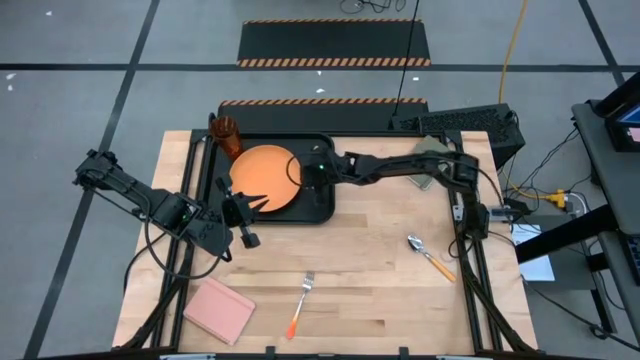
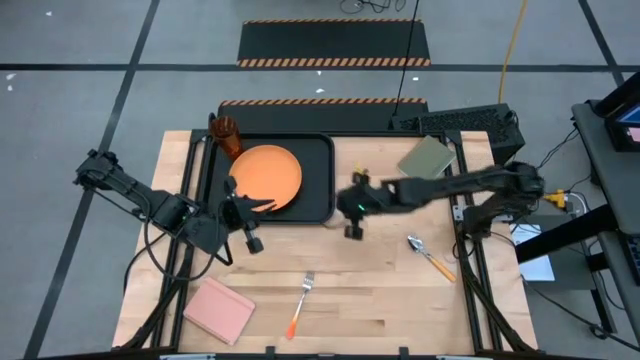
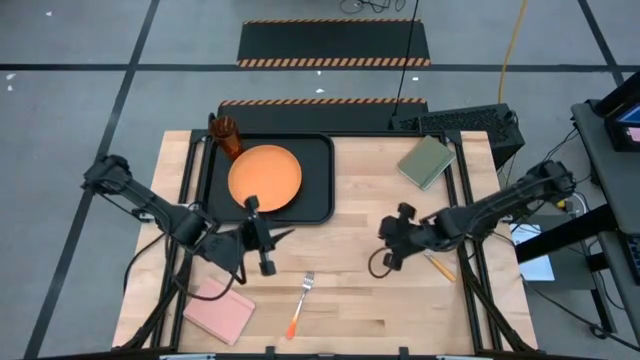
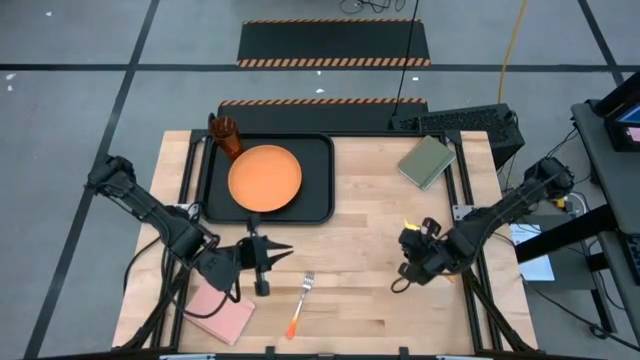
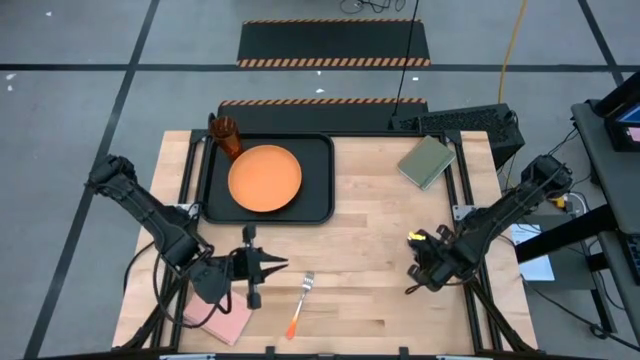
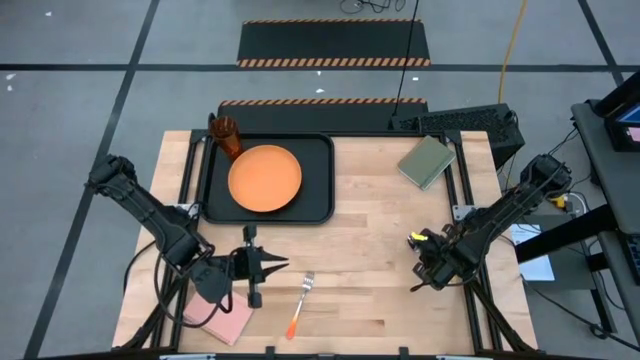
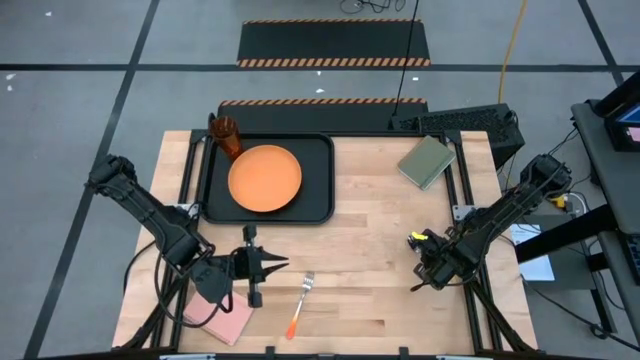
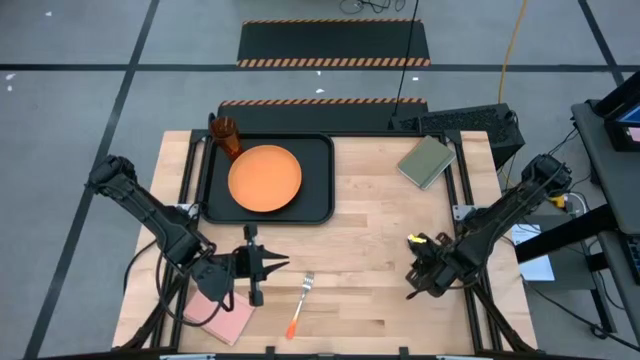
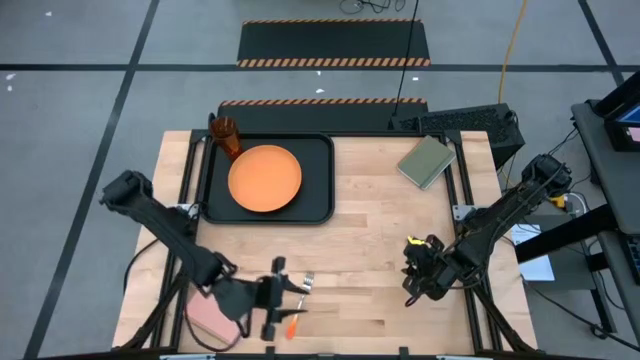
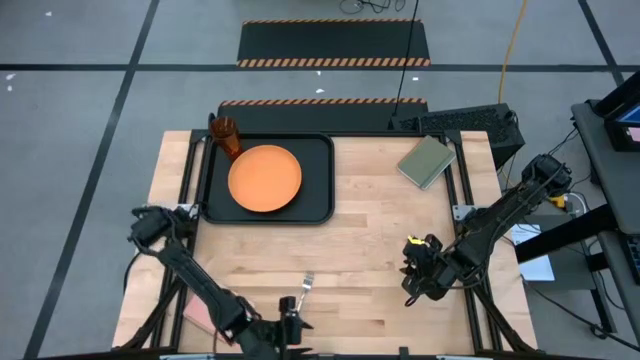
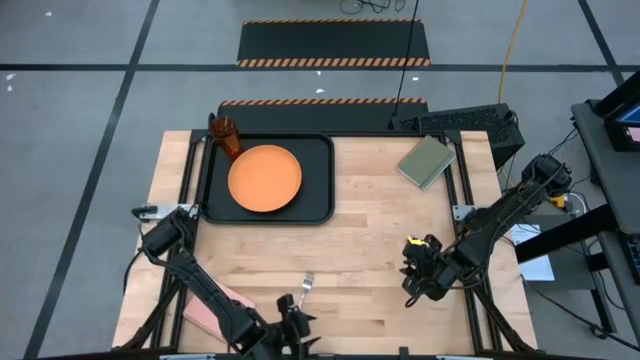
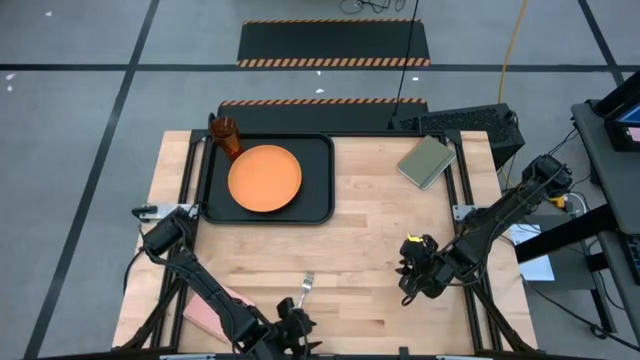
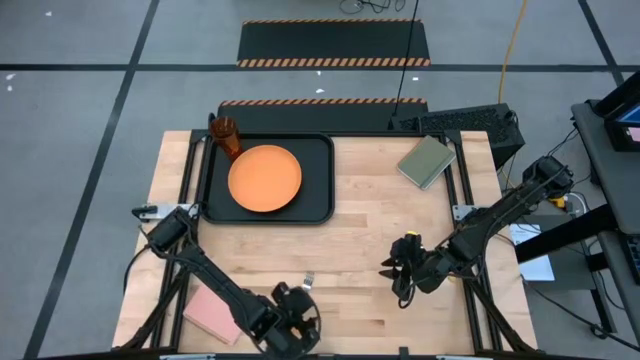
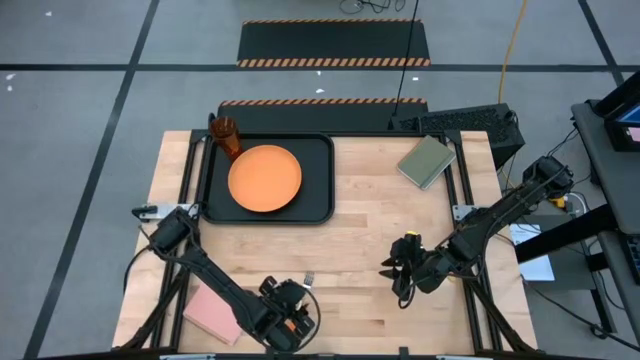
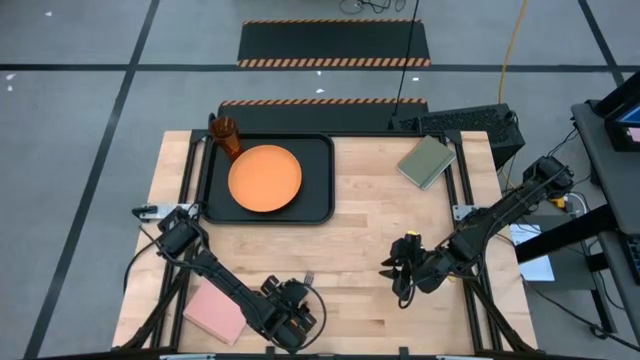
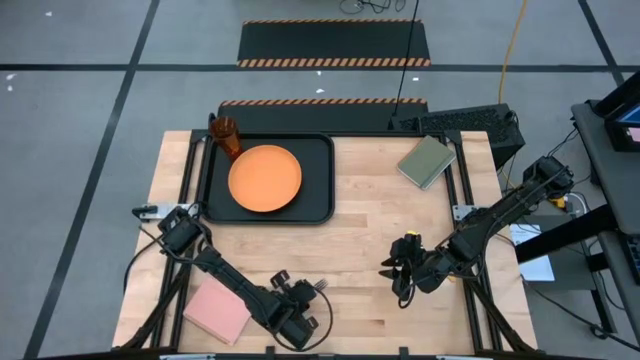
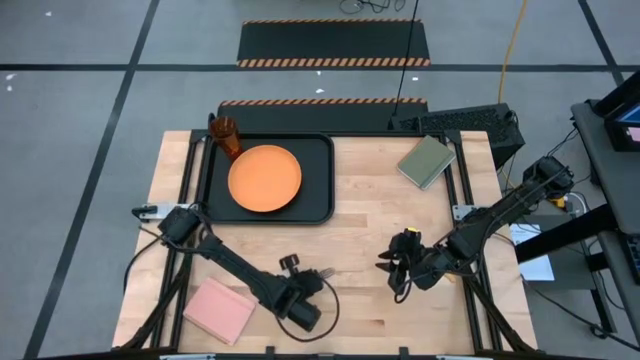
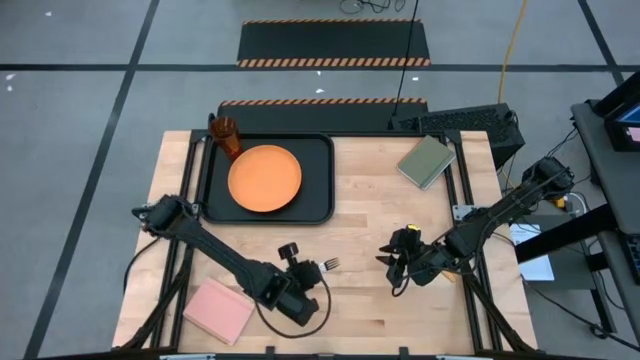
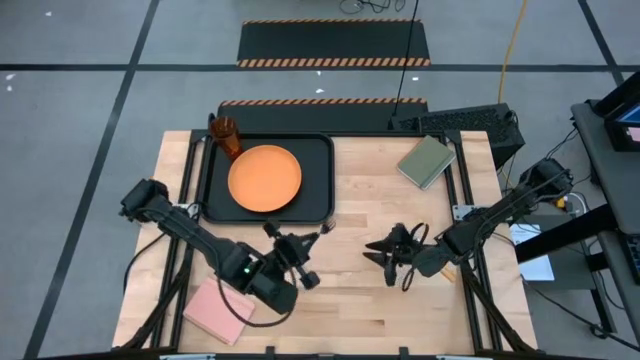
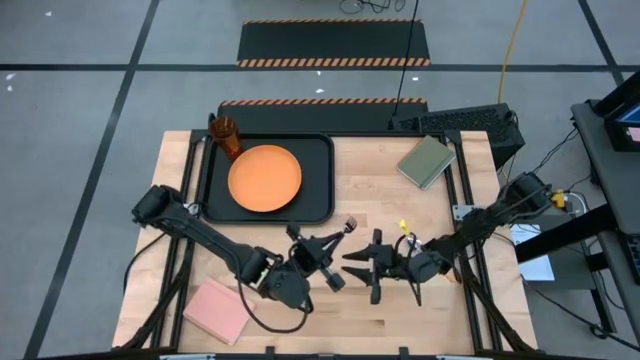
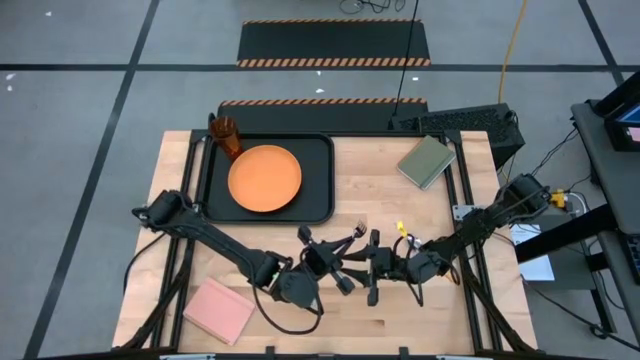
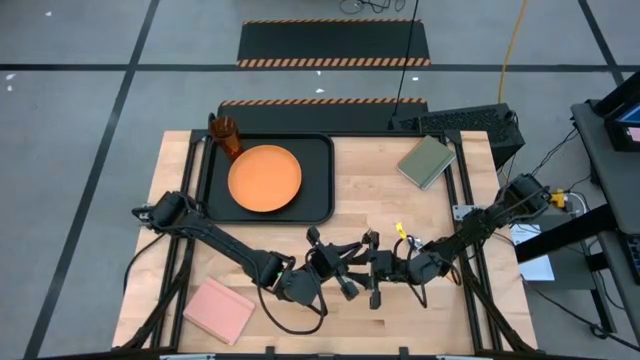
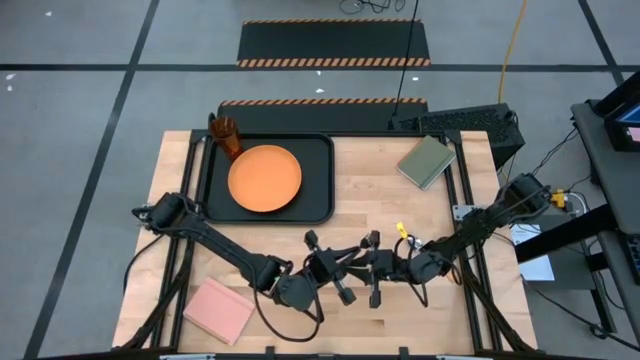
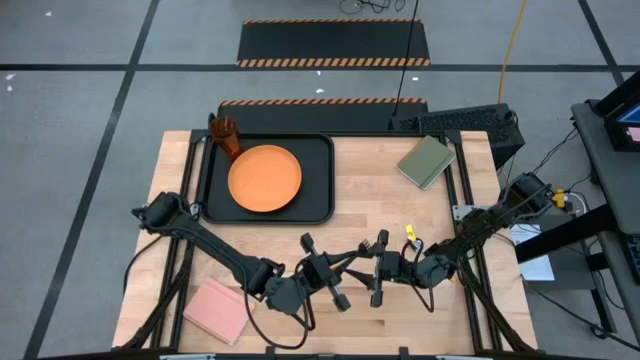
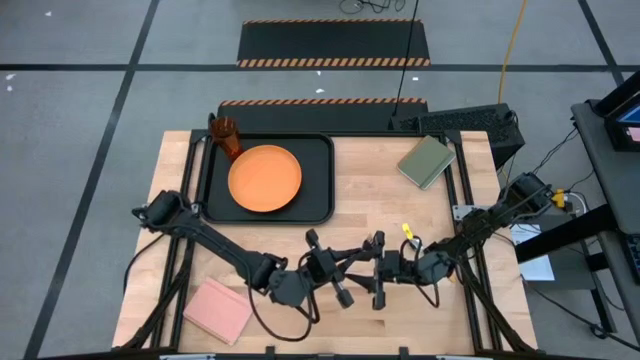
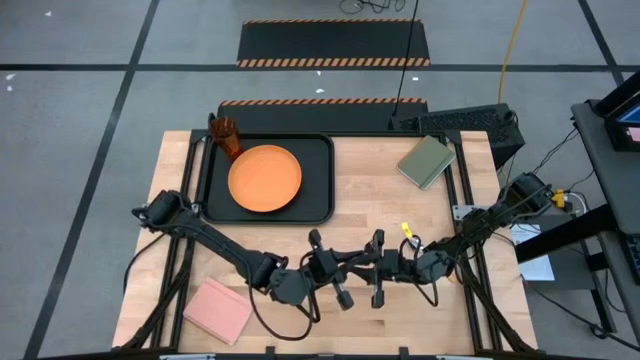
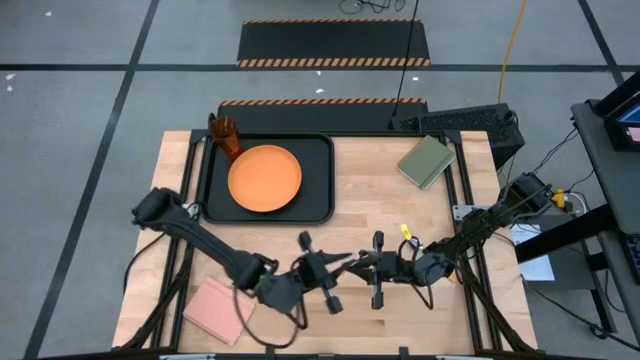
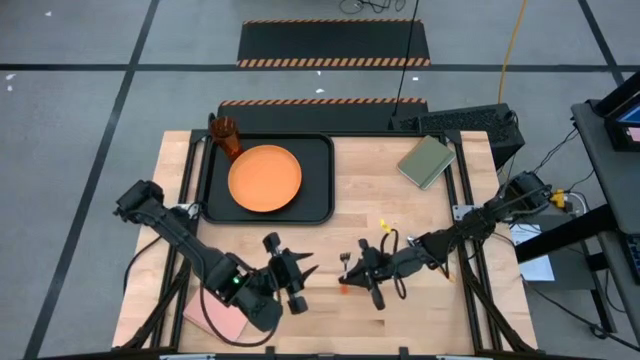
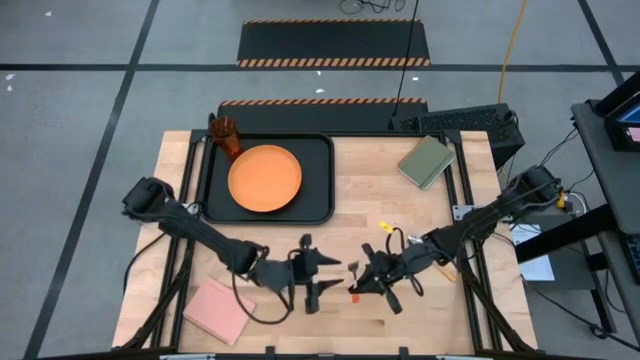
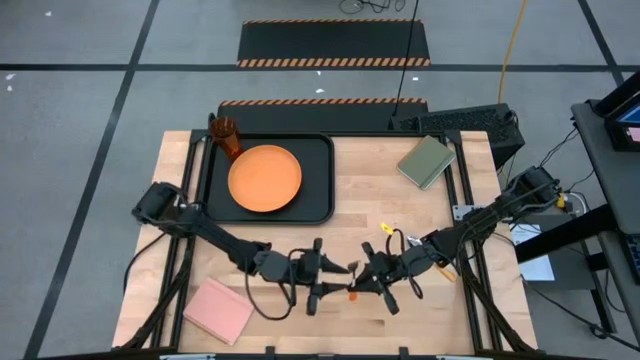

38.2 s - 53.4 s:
Task: Pick and place plate/cup/fork/spoon on tray
Put the orange fork on the black tray

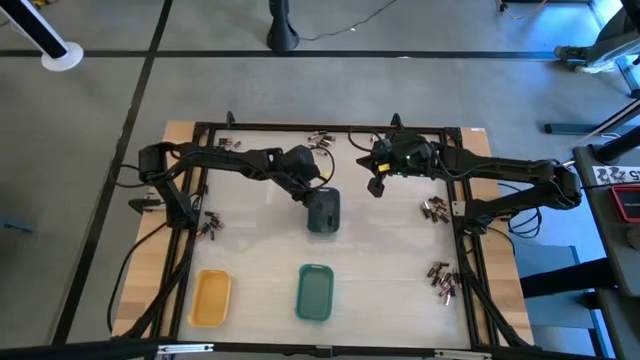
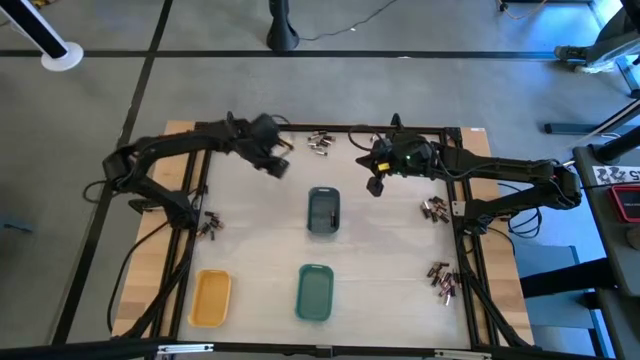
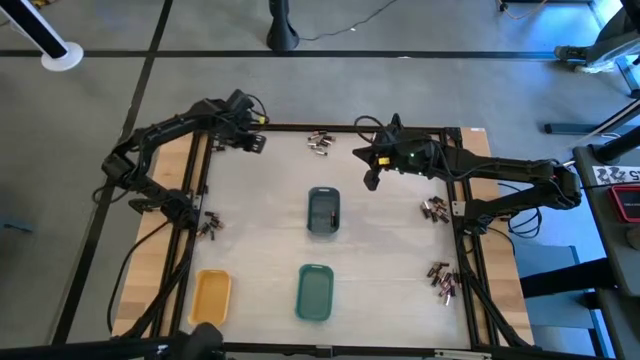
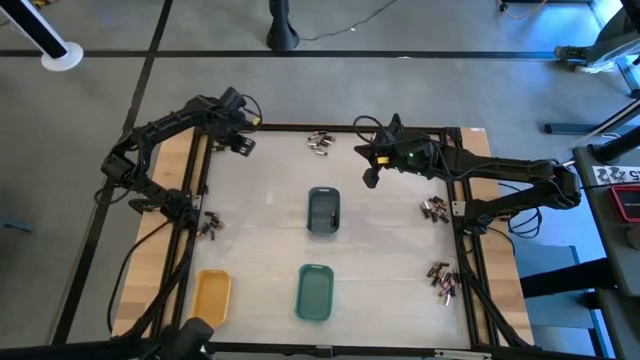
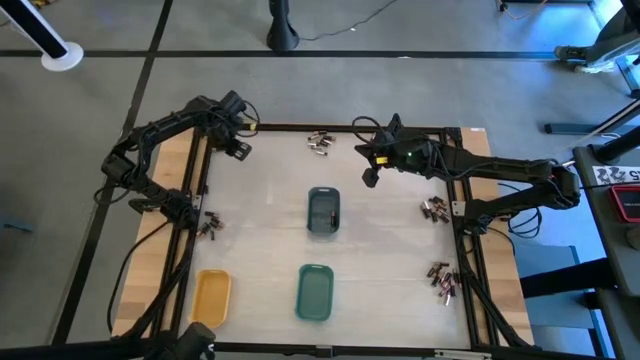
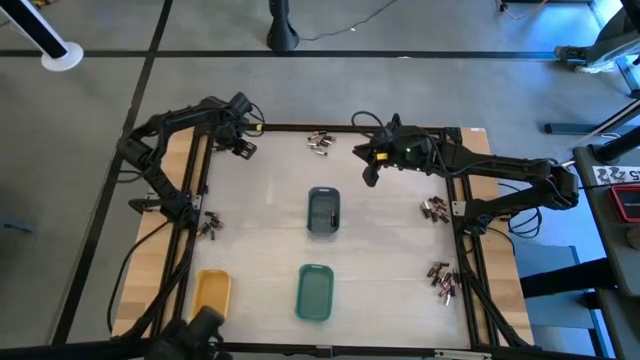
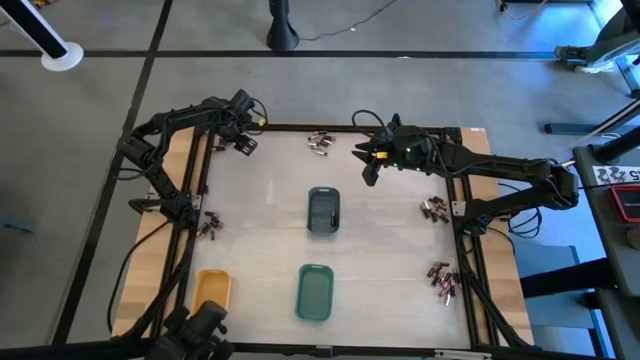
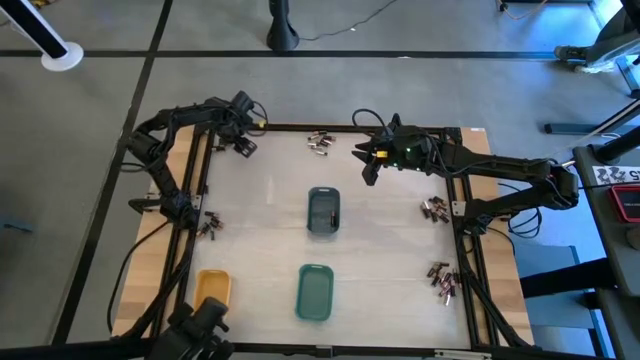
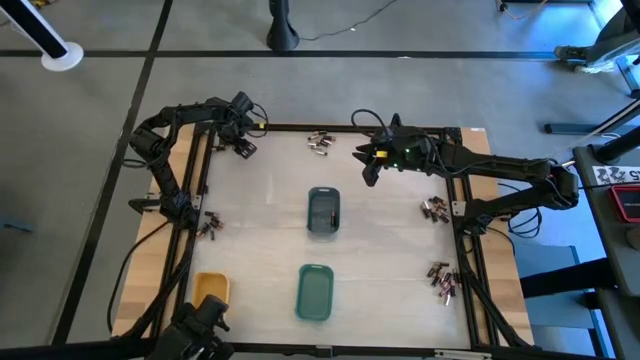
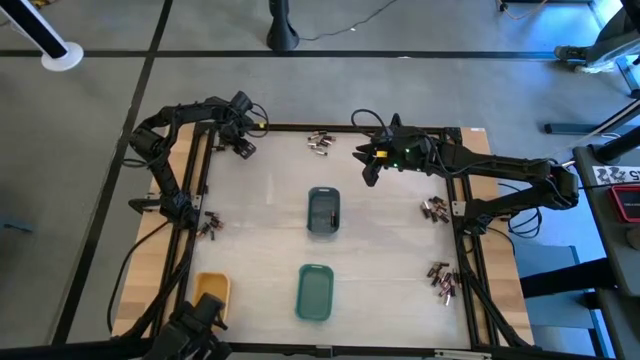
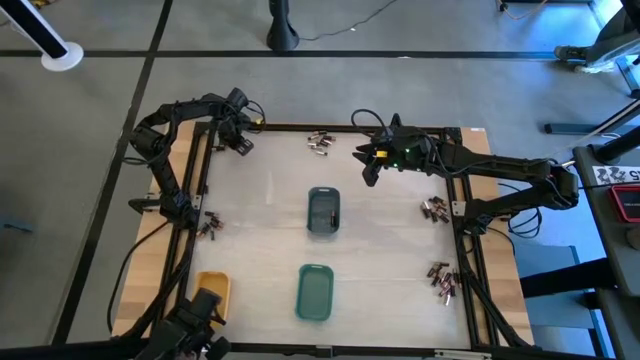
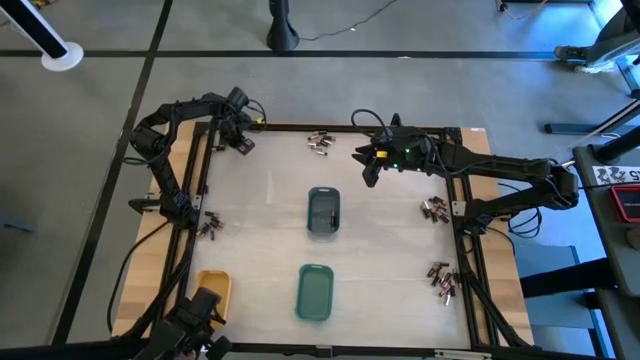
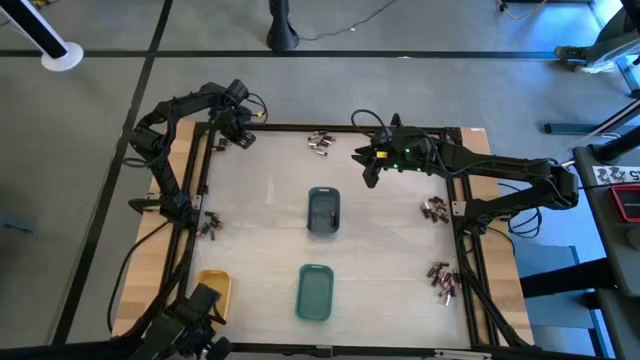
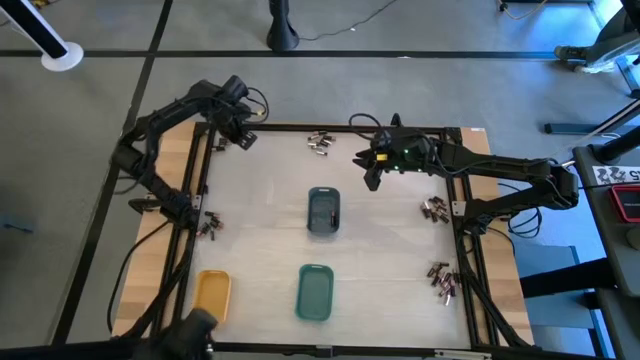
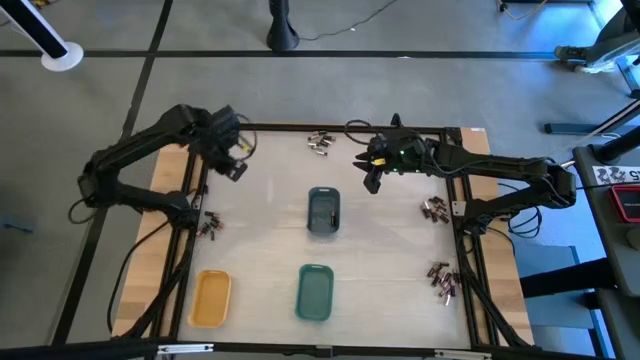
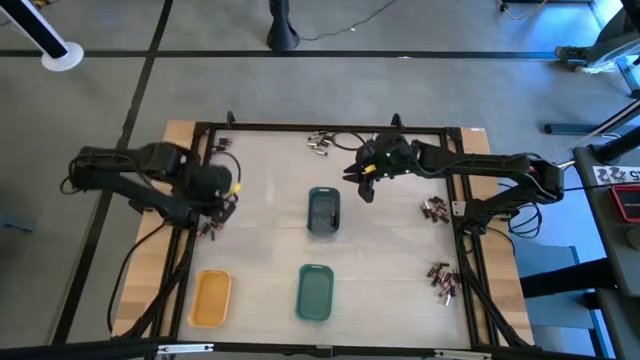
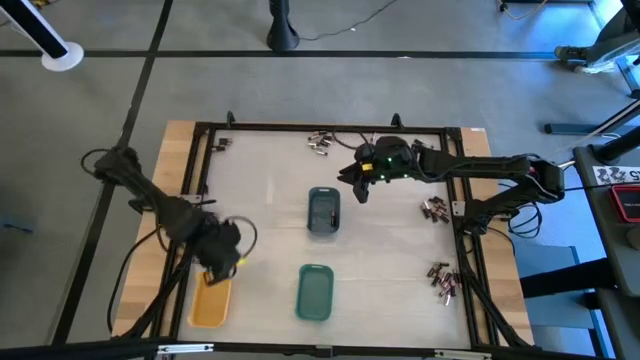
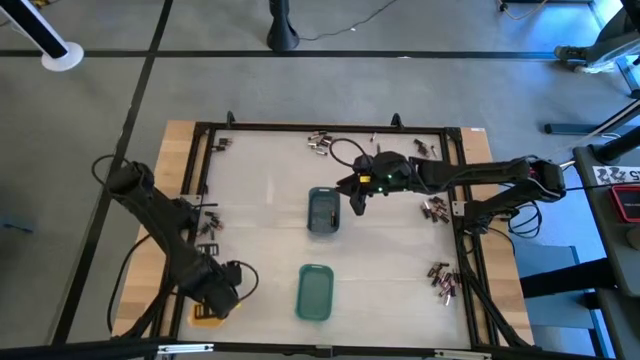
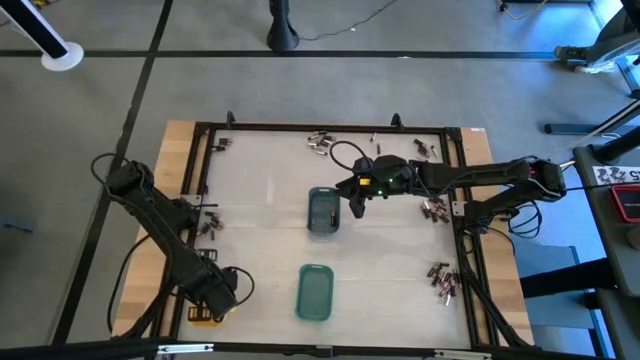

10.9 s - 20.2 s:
Task: Sort batteries
Put the small black battery into the yellow bin
